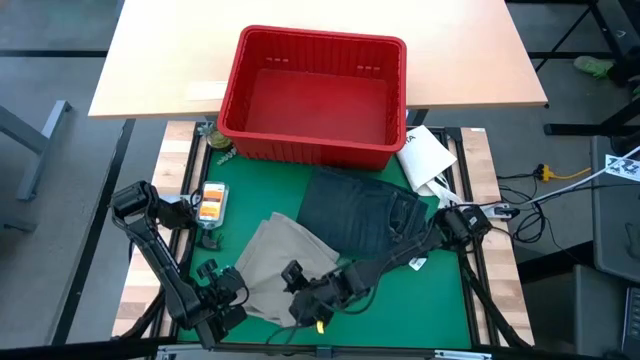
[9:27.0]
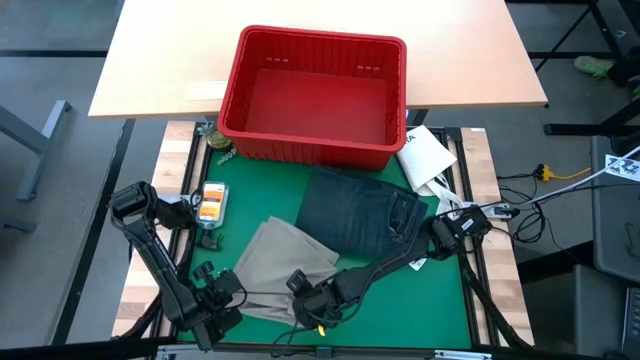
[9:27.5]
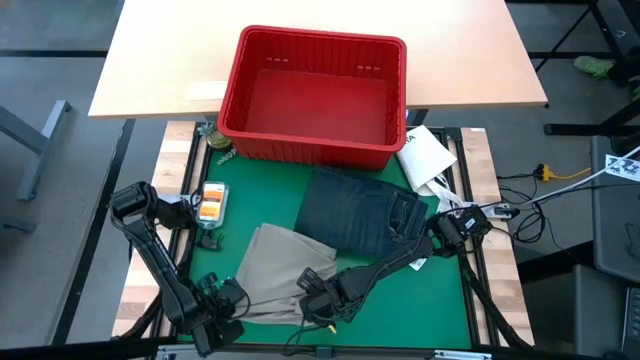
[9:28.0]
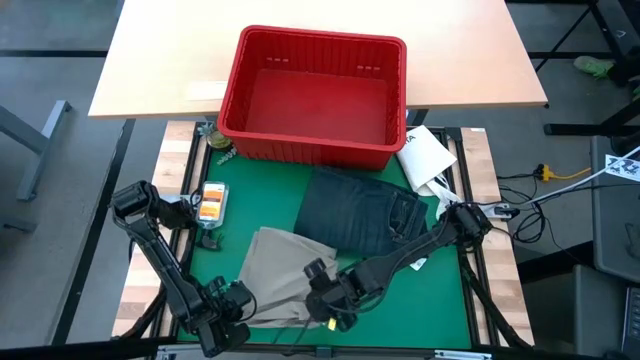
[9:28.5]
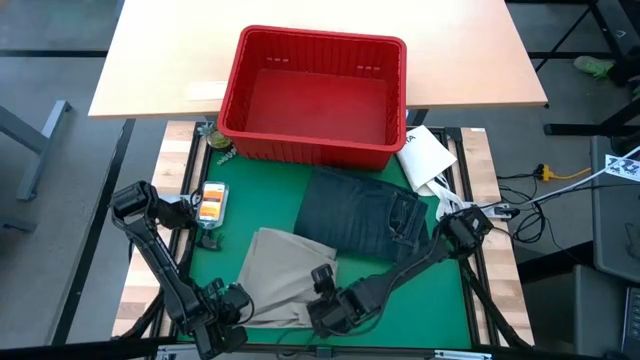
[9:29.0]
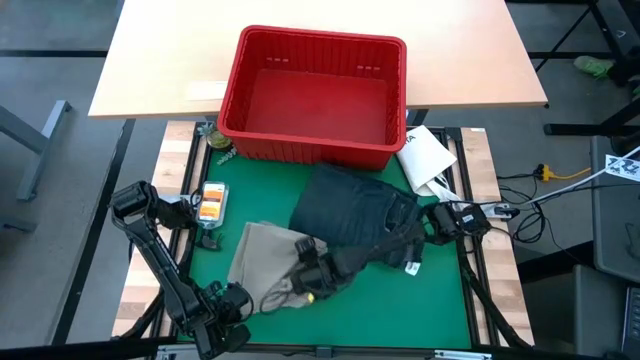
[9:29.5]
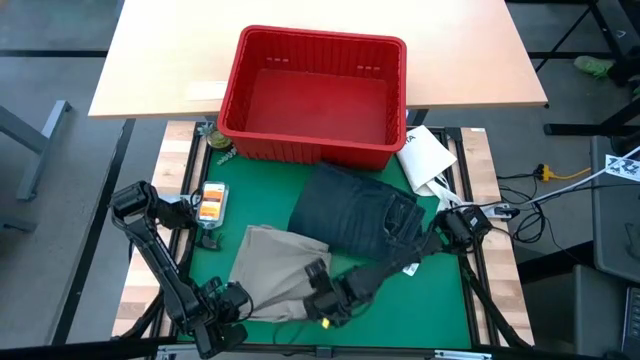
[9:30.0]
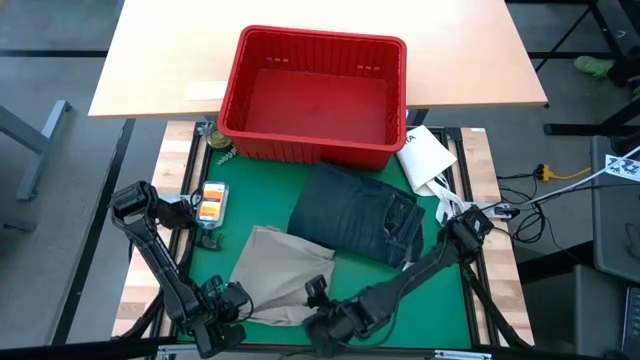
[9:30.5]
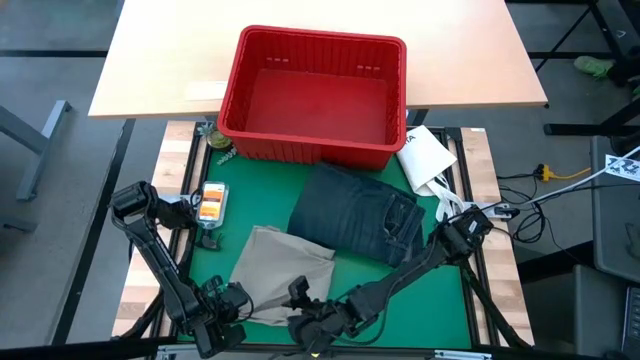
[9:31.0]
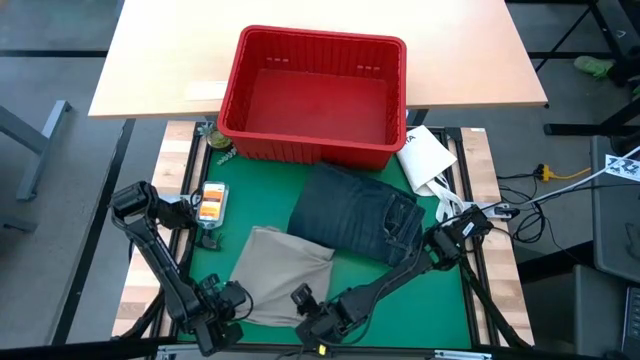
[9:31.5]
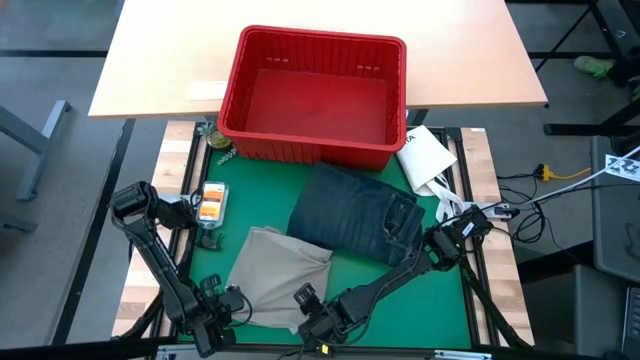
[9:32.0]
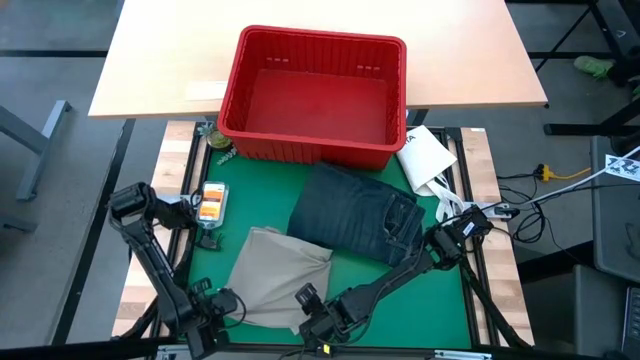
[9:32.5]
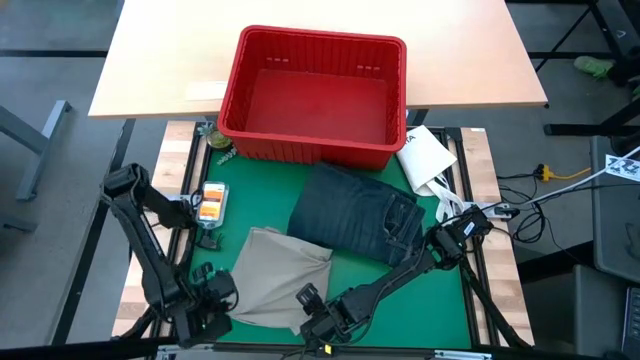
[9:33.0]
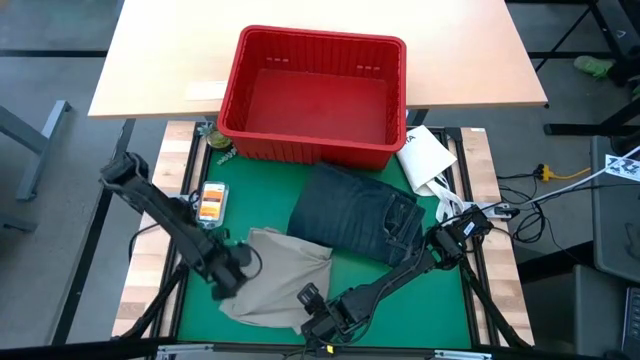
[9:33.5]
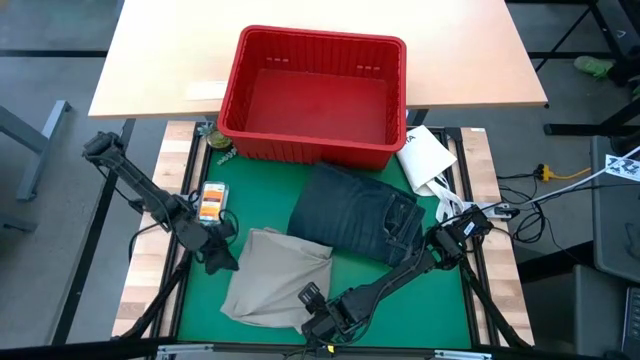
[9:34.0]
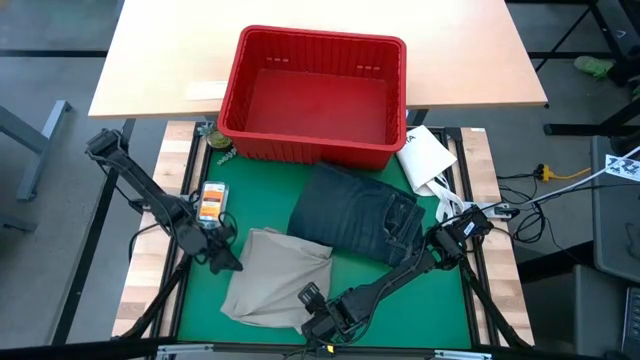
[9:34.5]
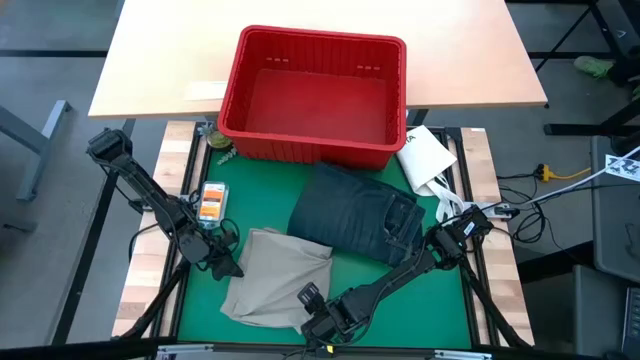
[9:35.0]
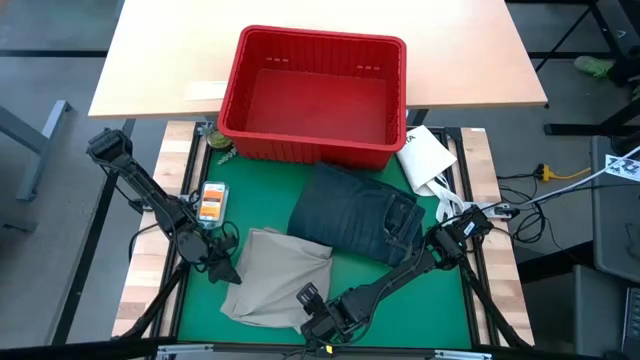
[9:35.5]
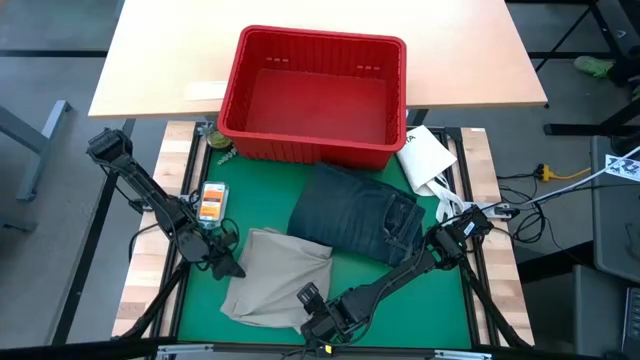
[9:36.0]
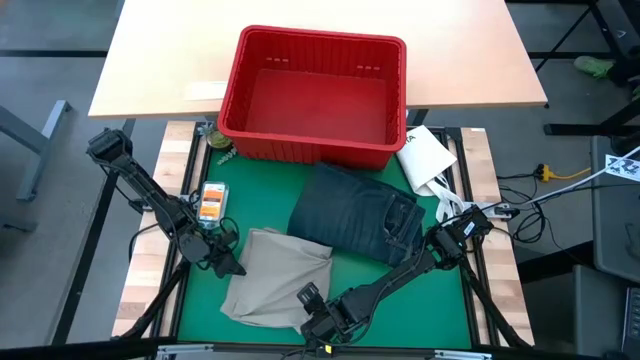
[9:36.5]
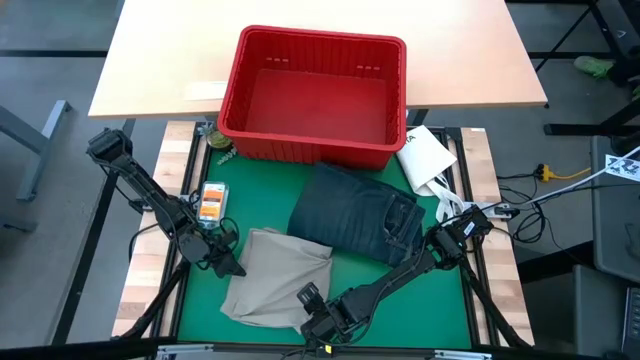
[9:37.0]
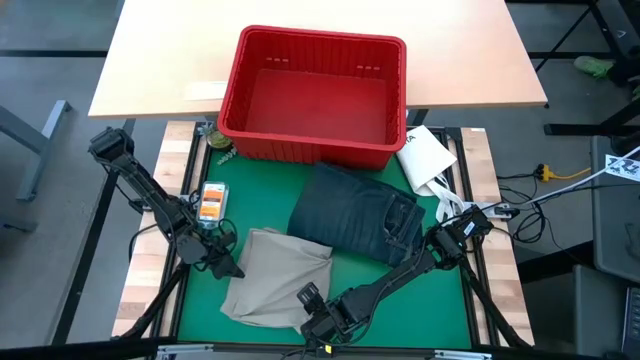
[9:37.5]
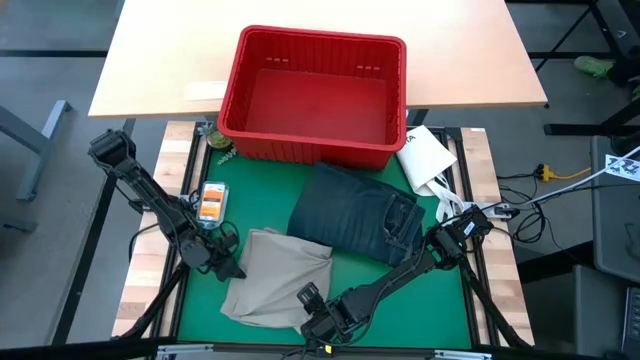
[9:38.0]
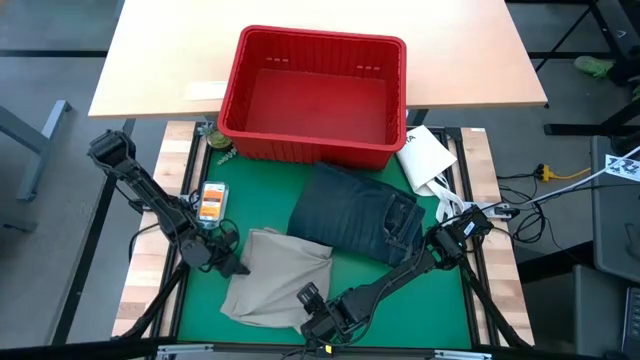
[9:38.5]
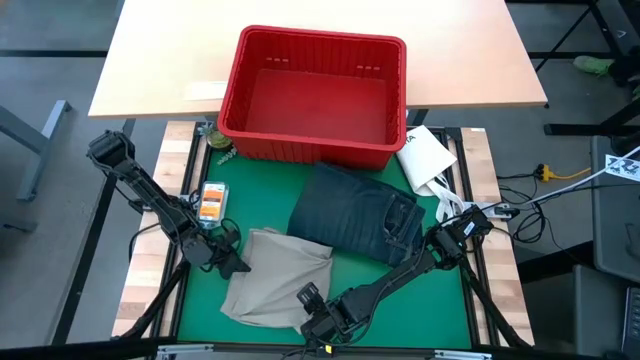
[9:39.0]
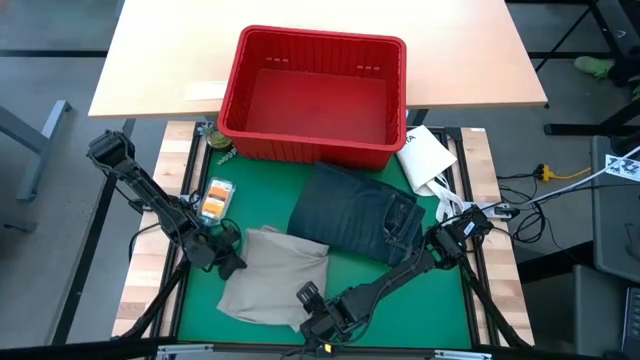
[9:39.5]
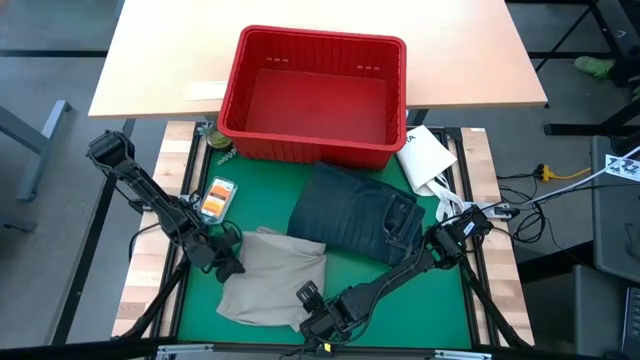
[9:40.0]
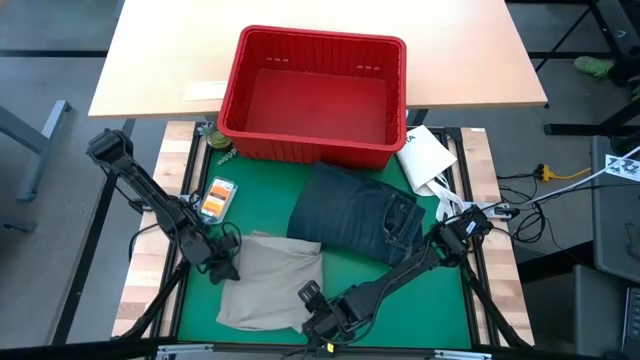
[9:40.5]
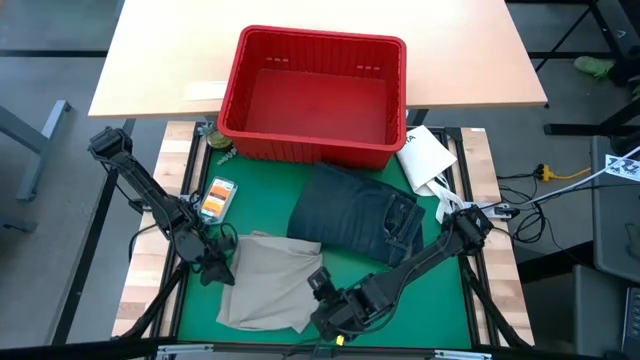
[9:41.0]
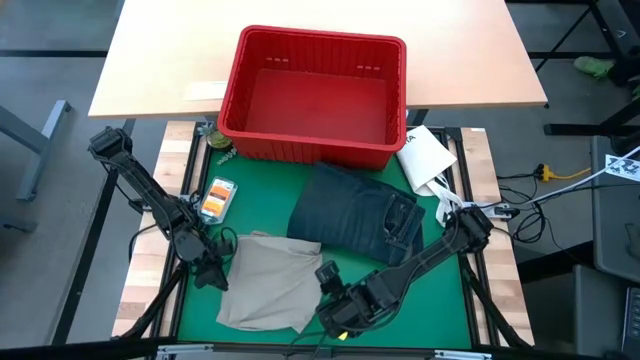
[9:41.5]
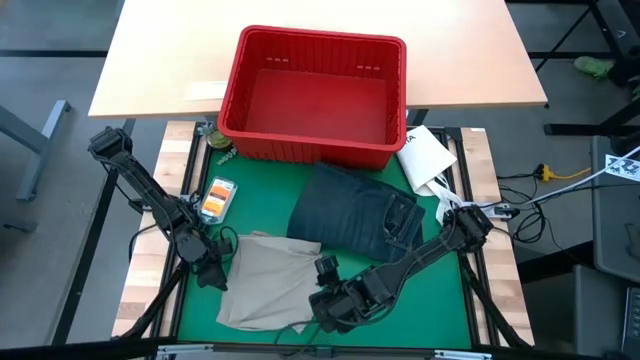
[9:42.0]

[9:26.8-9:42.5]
Task: Fold Laundry from Bin
Fold the gray shorts

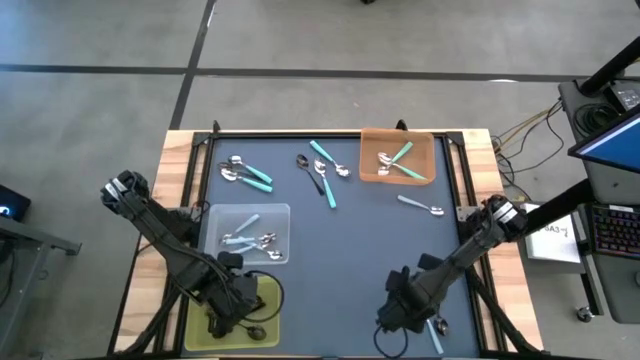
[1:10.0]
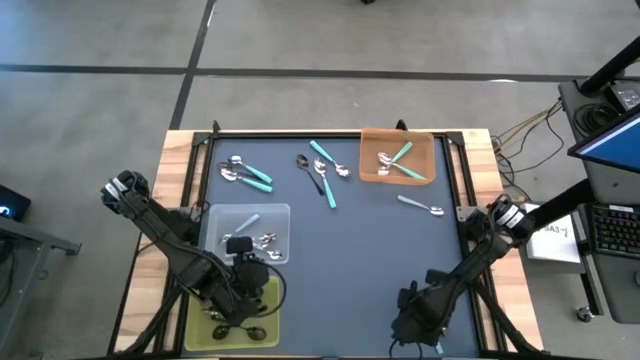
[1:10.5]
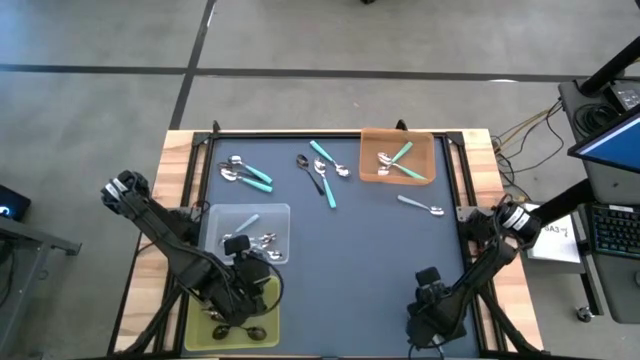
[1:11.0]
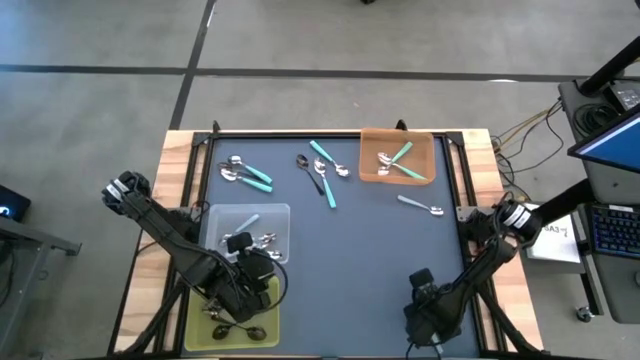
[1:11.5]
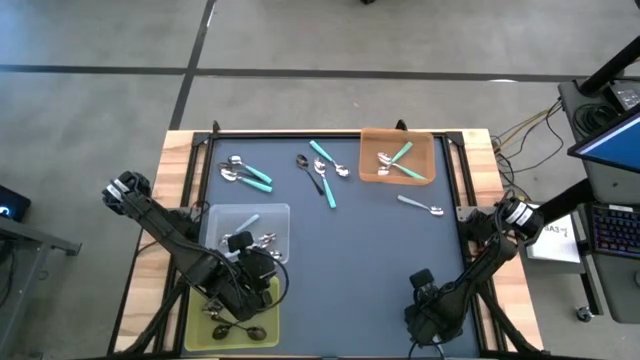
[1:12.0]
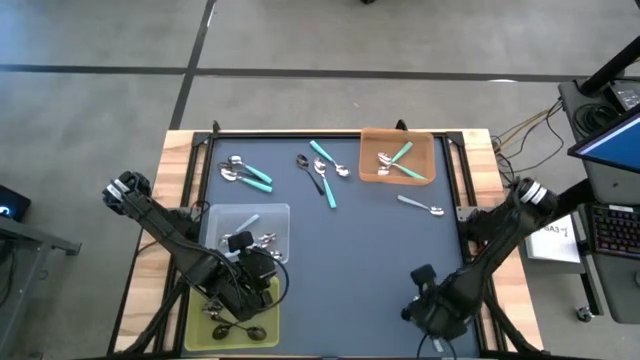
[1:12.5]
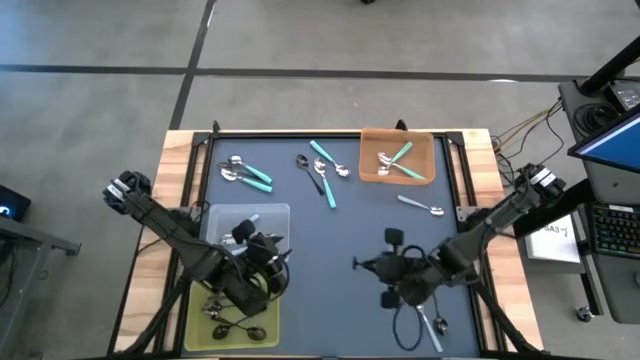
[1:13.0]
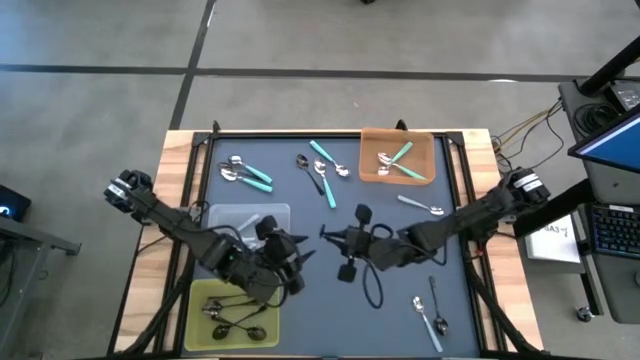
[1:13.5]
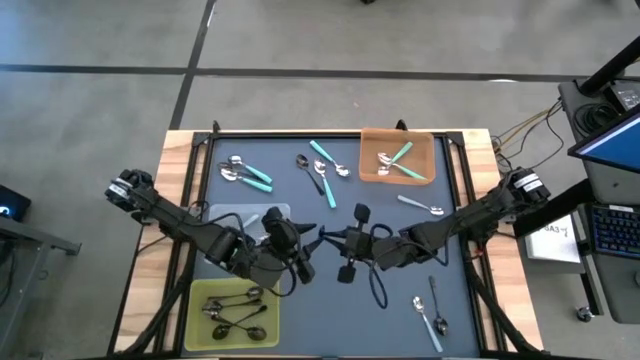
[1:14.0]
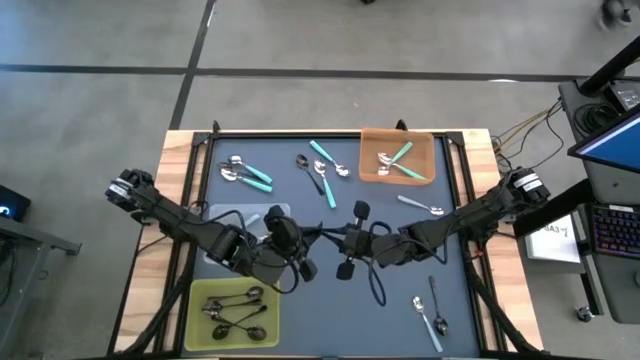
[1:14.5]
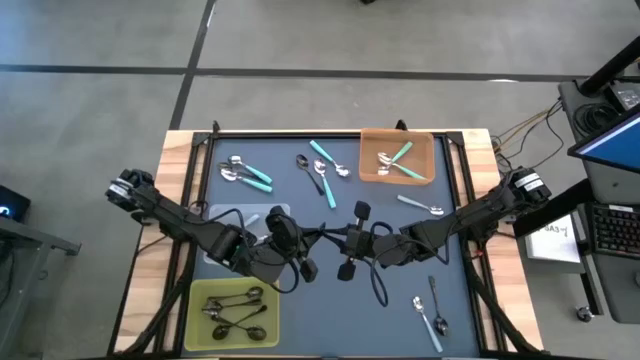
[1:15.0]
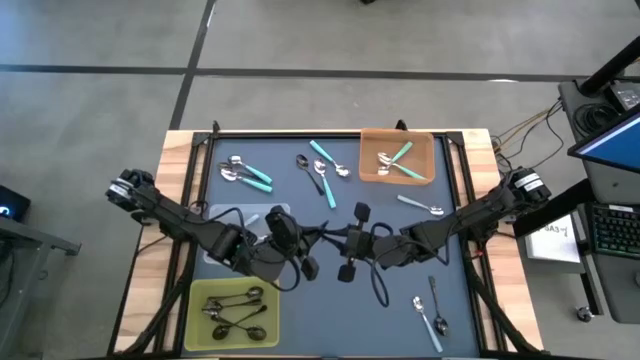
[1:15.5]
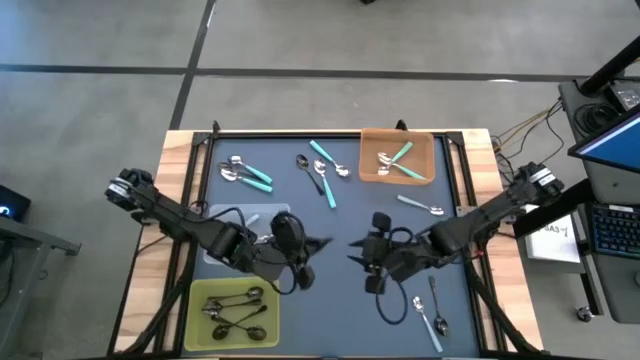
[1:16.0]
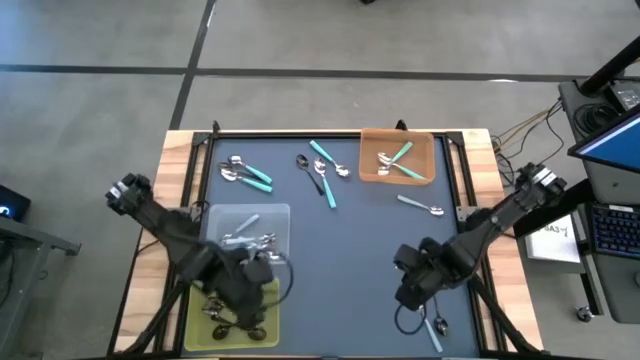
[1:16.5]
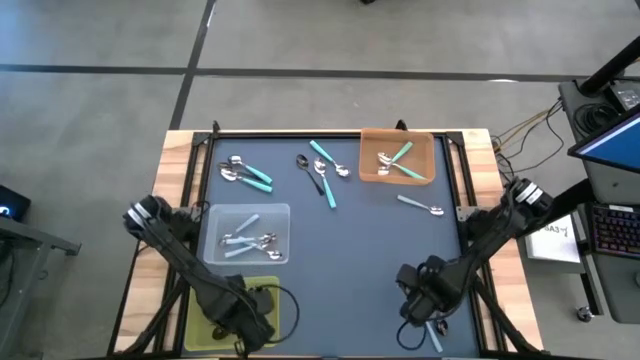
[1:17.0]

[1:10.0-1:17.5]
Task: Sort silverware by color (type)
Put the black spoon into the yellow bin
